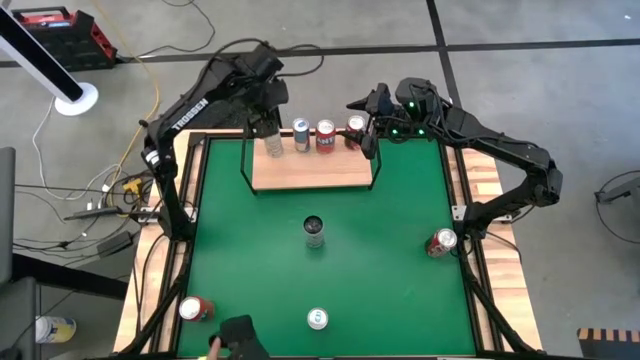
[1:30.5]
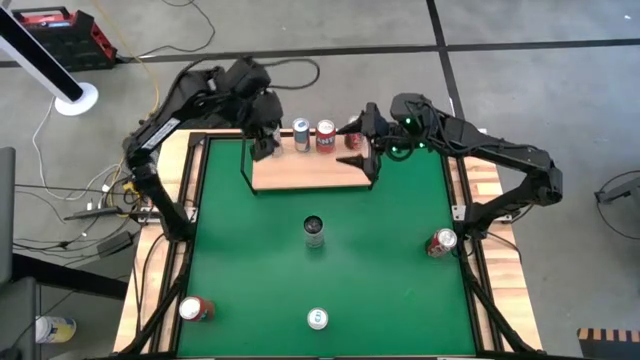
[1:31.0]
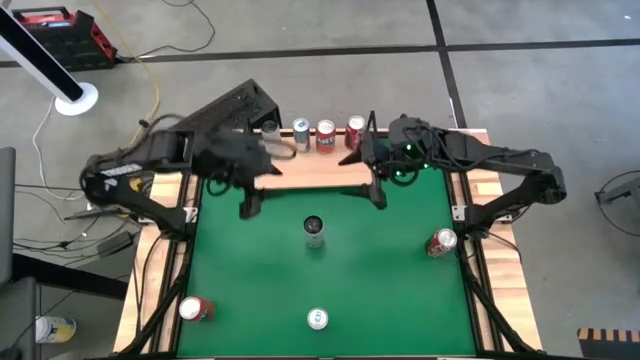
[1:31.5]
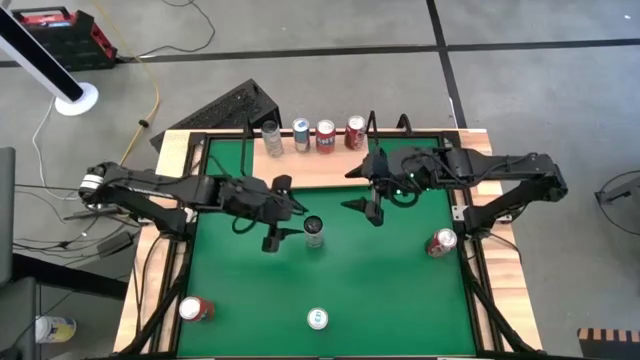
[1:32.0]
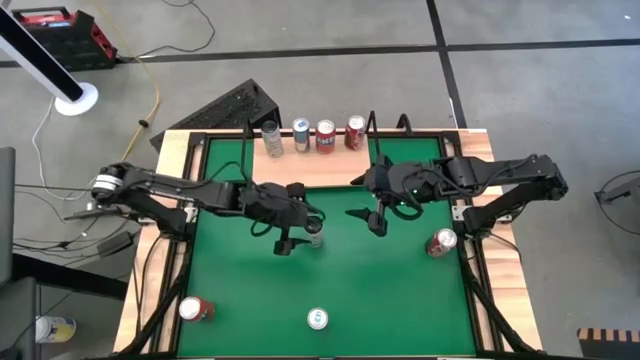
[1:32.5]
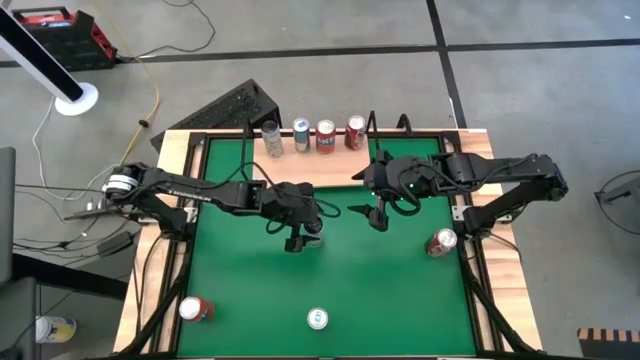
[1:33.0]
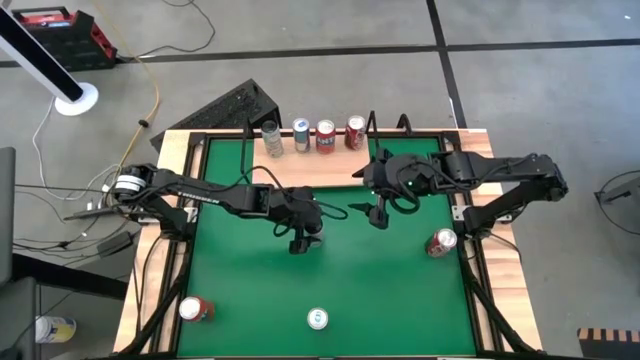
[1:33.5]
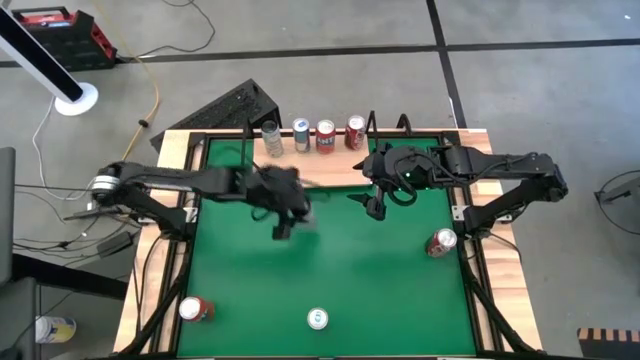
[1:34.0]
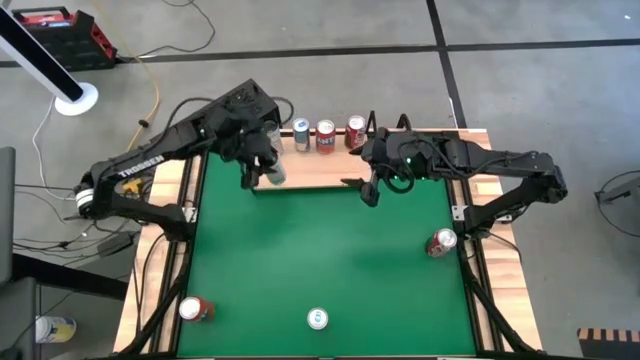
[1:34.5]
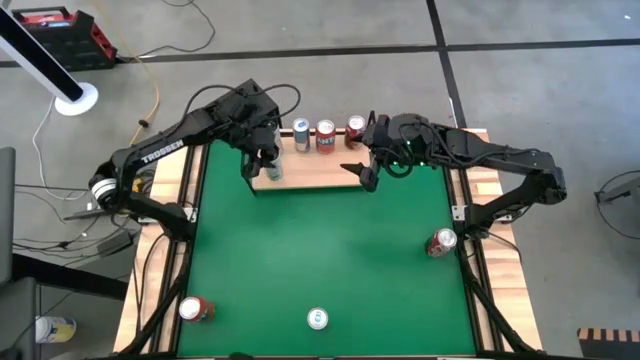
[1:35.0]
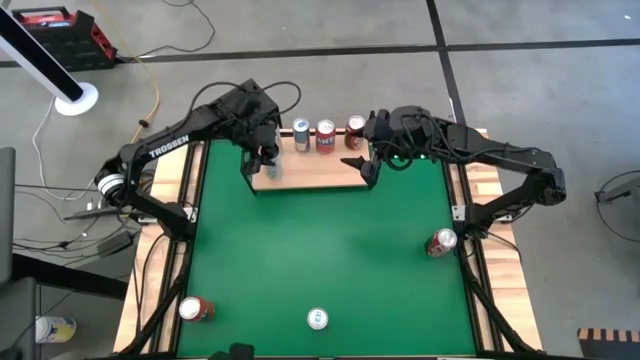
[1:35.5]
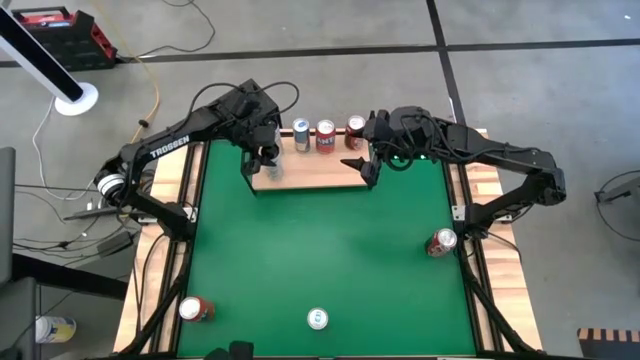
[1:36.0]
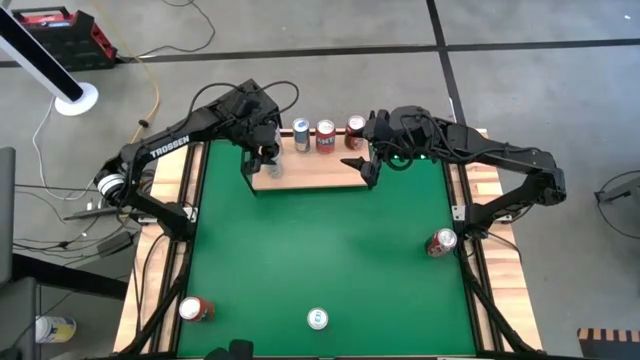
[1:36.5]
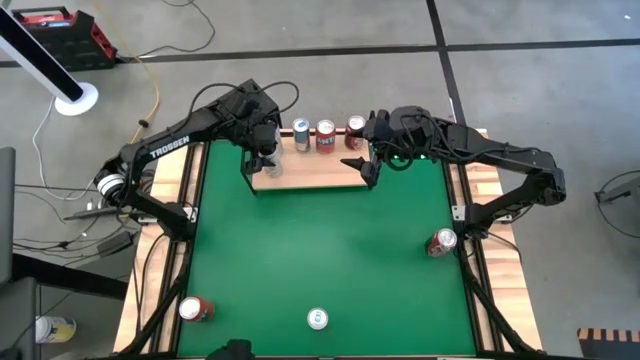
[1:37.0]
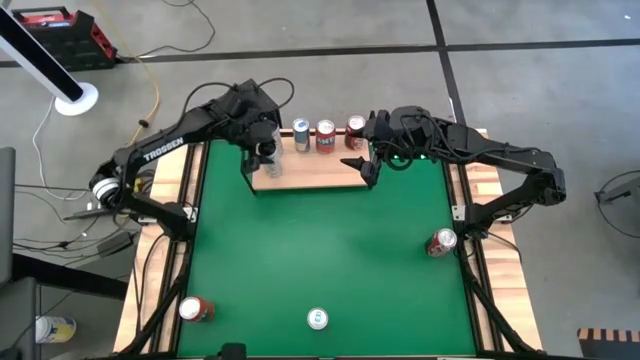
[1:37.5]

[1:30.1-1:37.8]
Task: Place canned beverage on shelf
Put the white soda can on the shelf aligned with the other white soda can

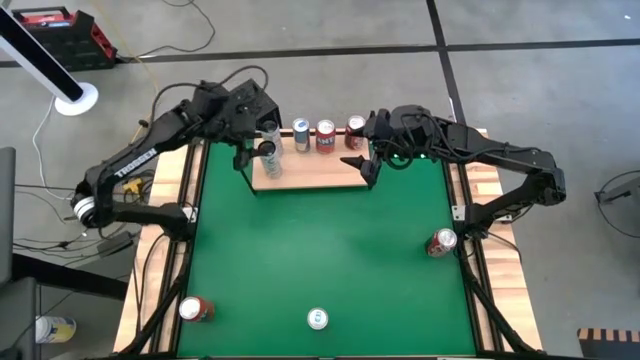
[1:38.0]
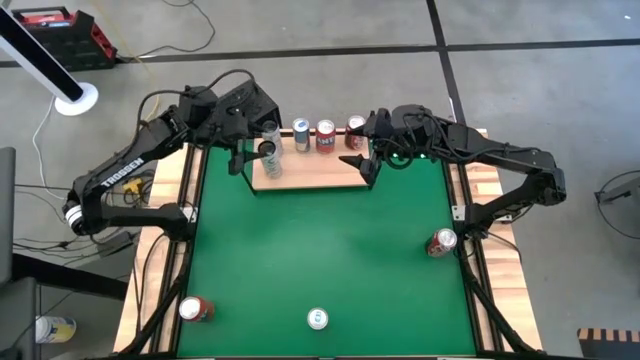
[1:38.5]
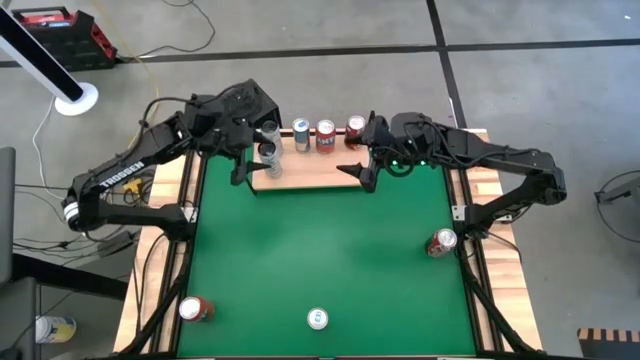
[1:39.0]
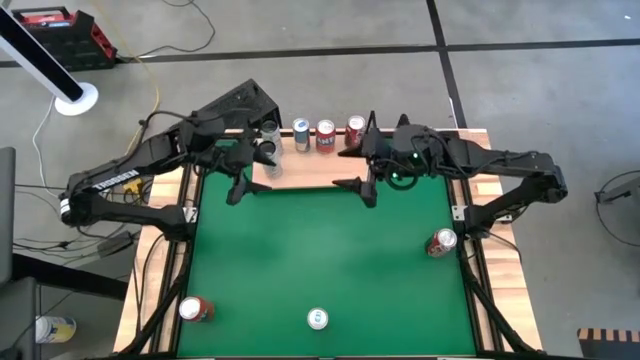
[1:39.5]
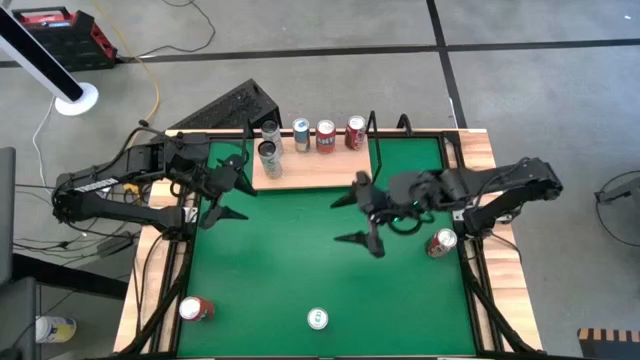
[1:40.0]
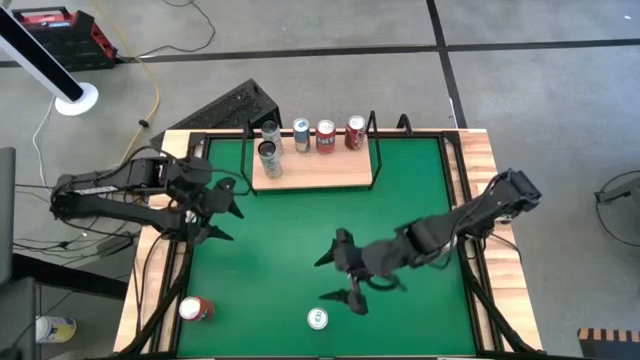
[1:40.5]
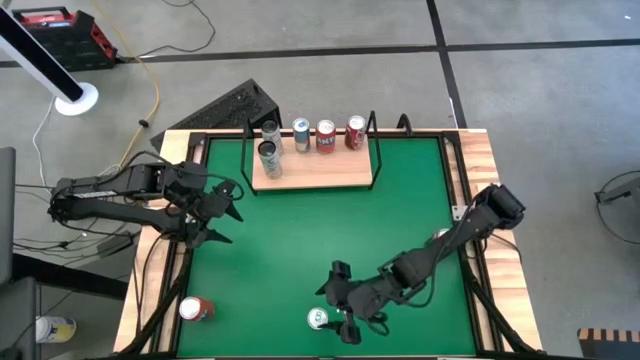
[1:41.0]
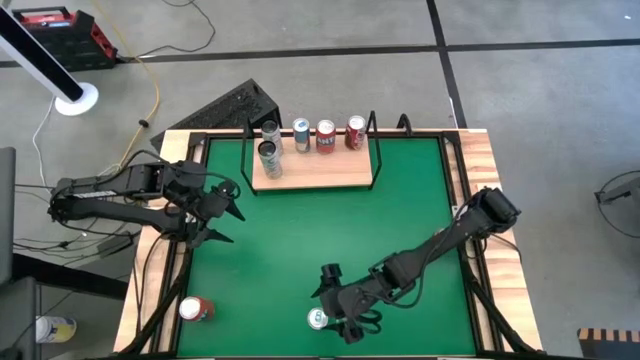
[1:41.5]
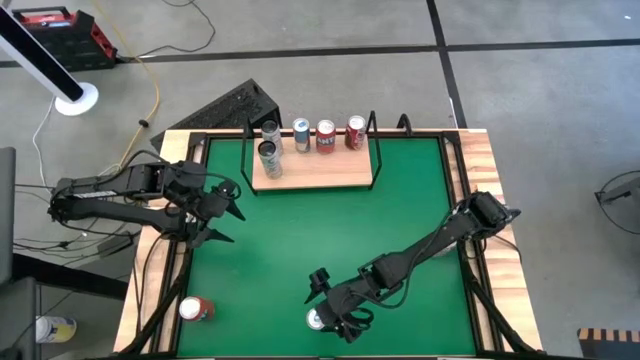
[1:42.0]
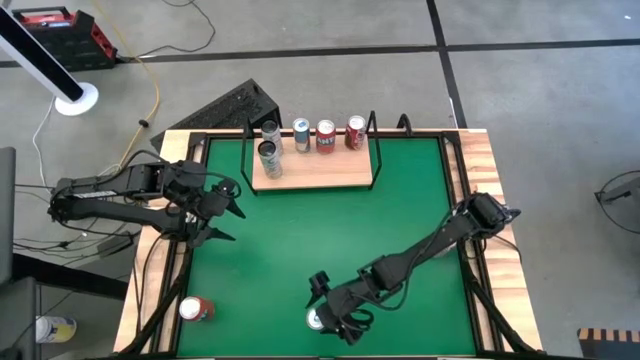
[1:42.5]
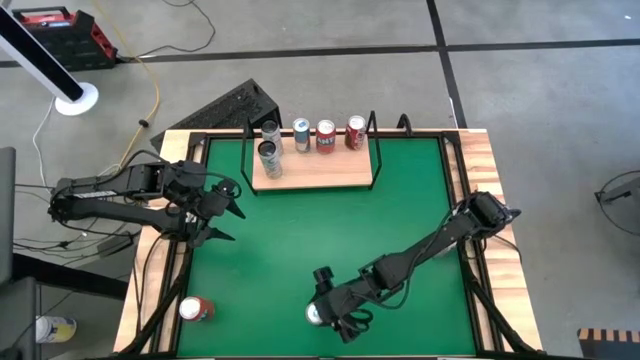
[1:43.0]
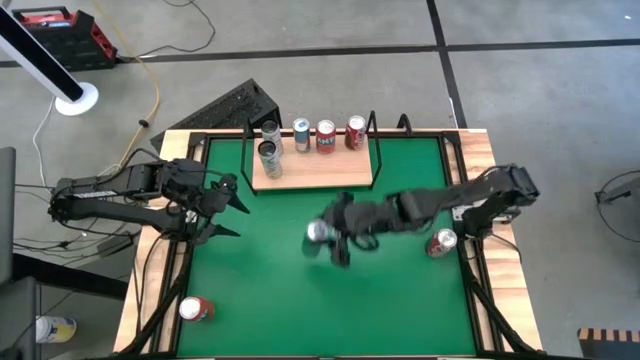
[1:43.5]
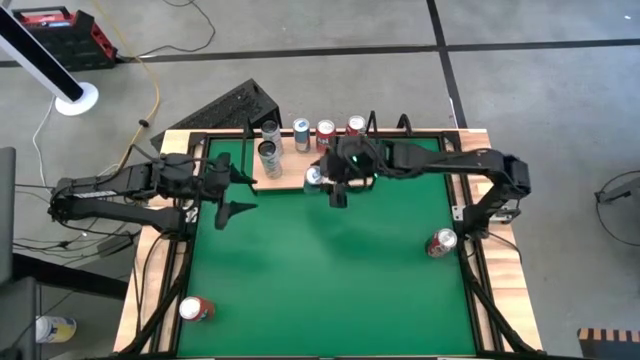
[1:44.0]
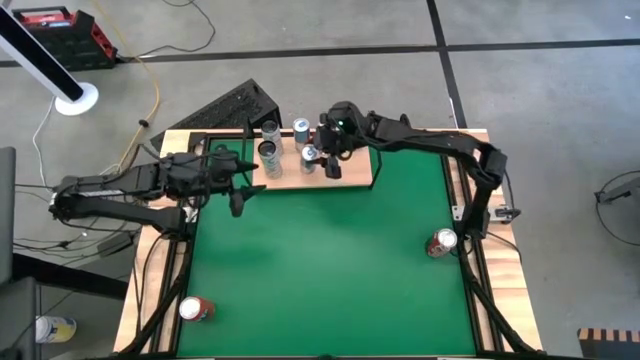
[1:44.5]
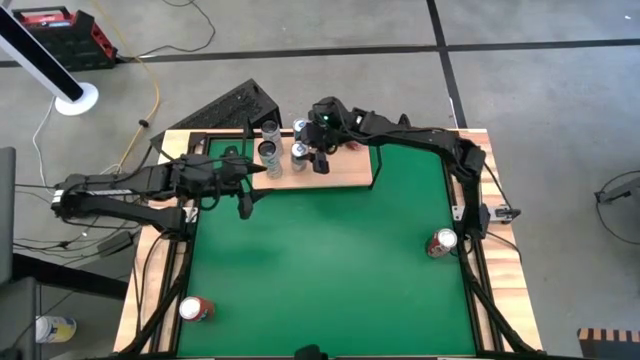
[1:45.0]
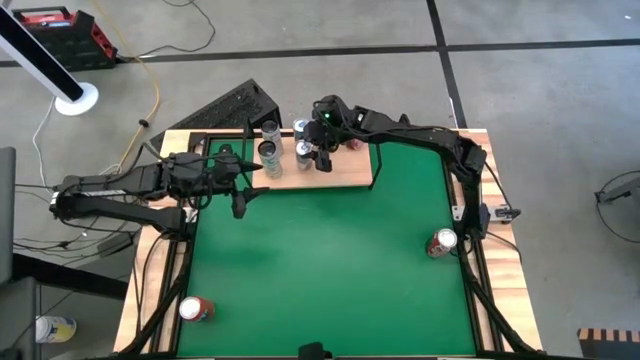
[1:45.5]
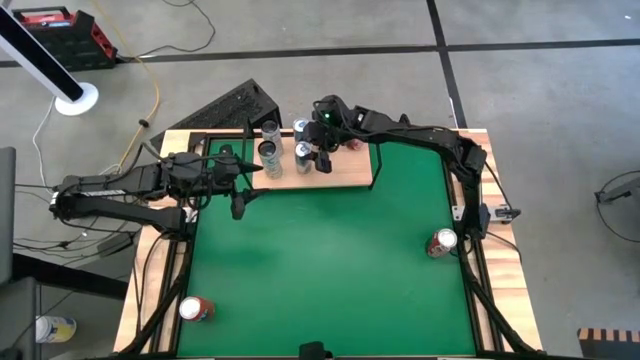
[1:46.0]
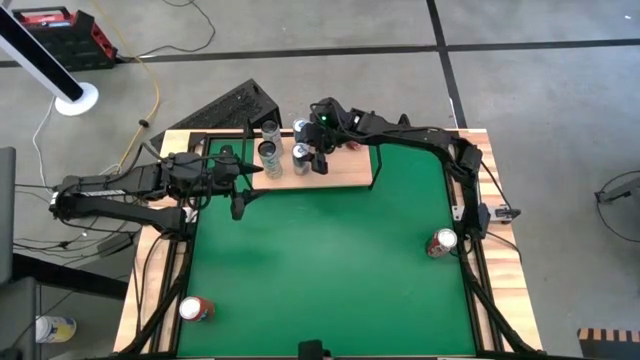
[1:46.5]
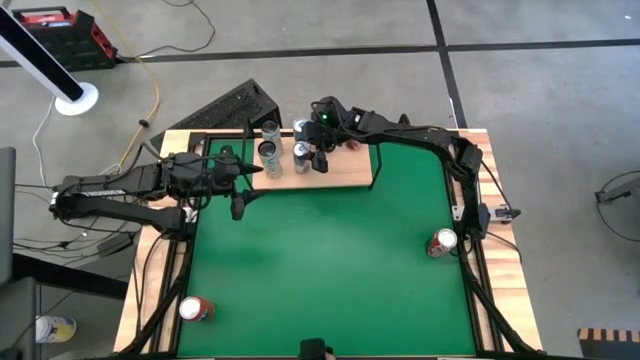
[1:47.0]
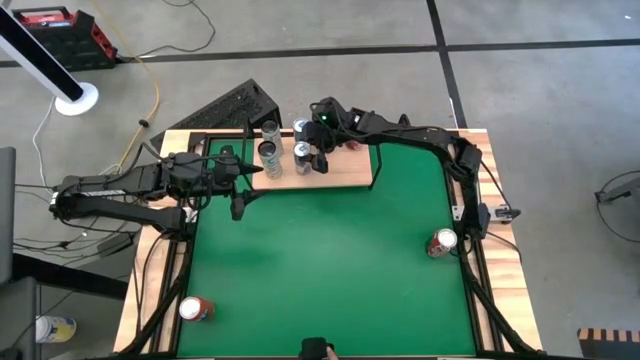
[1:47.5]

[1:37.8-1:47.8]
Put the blue soda can on the shelf aligned with the other blue soda can

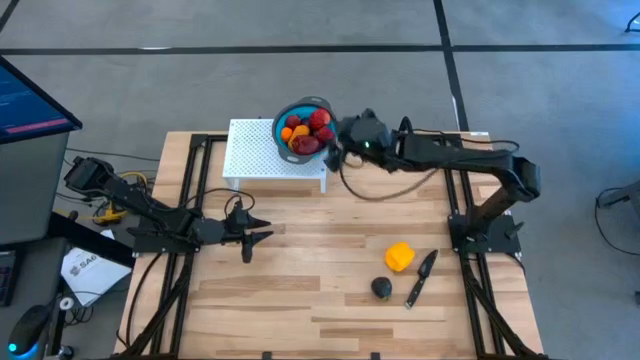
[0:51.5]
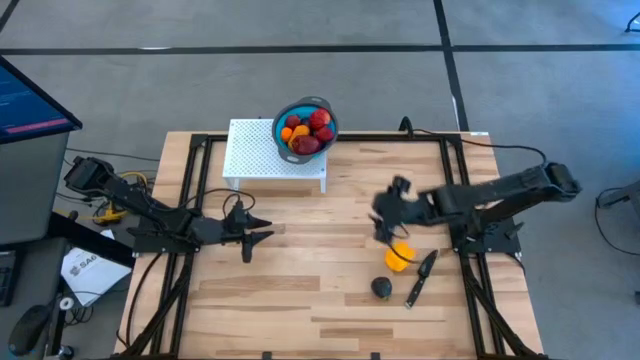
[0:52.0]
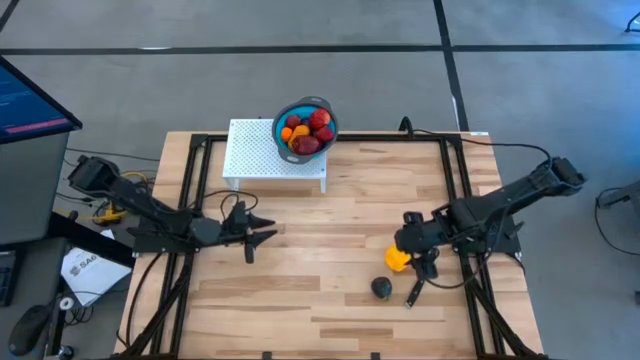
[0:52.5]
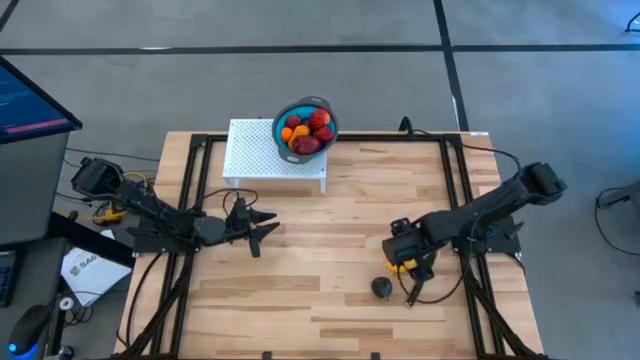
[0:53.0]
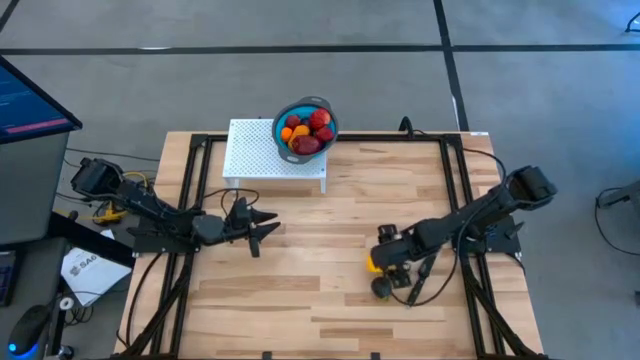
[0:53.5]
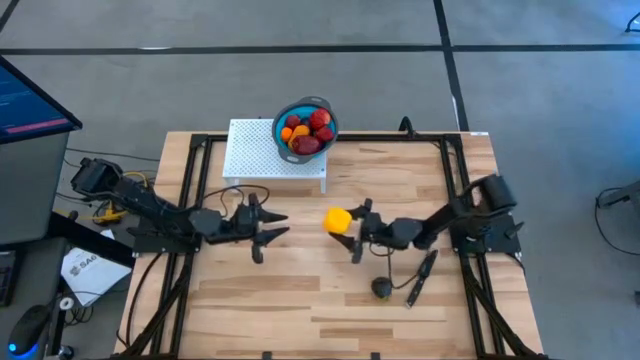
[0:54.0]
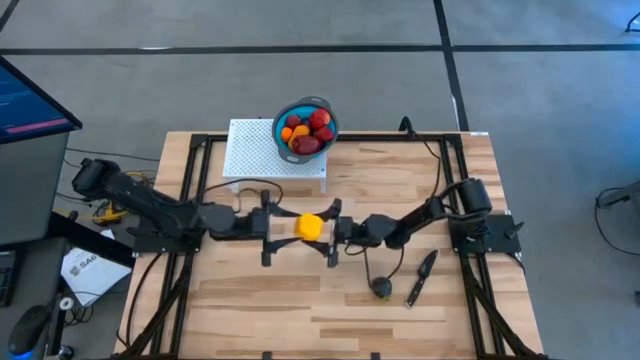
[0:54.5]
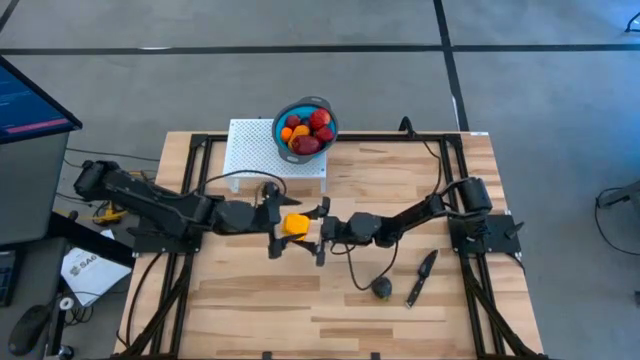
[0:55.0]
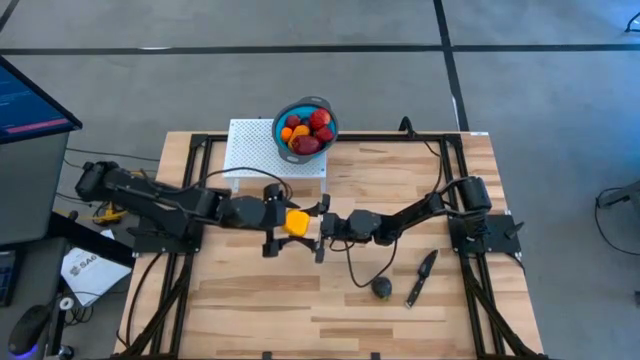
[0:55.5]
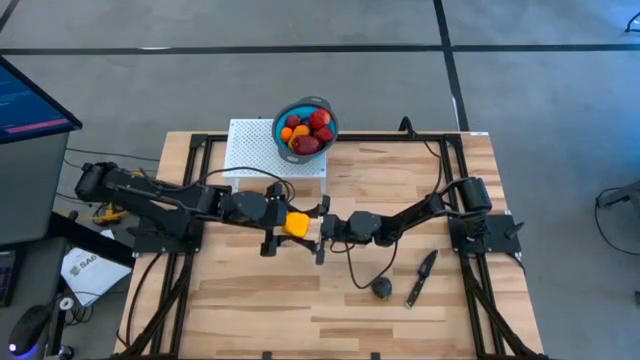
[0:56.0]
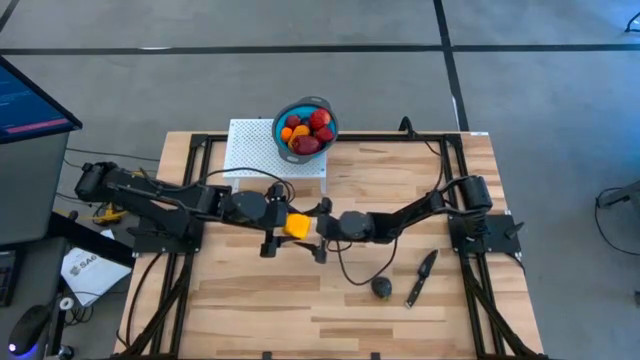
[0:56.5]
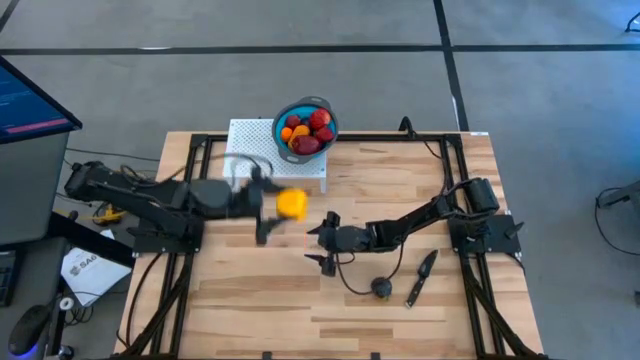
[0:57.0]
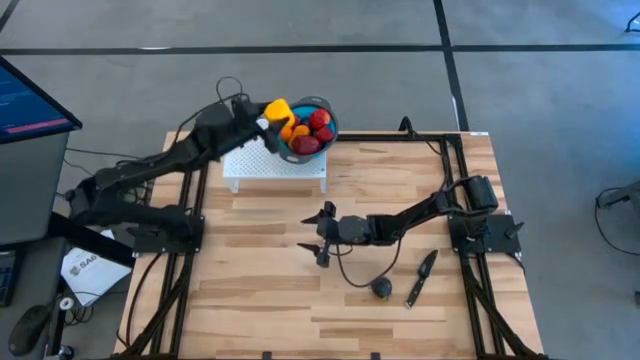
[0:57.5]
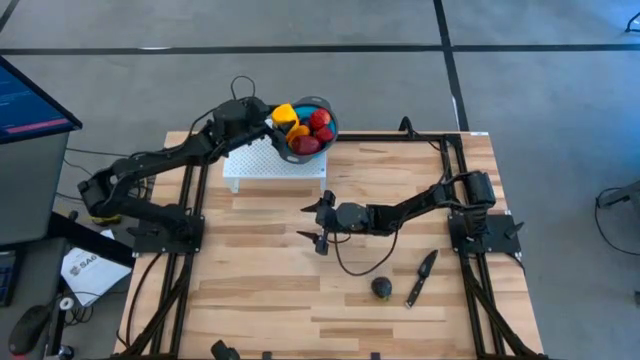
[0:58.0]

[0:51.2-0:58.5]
Task: Pick & Place Fruit
Put the yellow bell pepper into the blue strainer bowl
